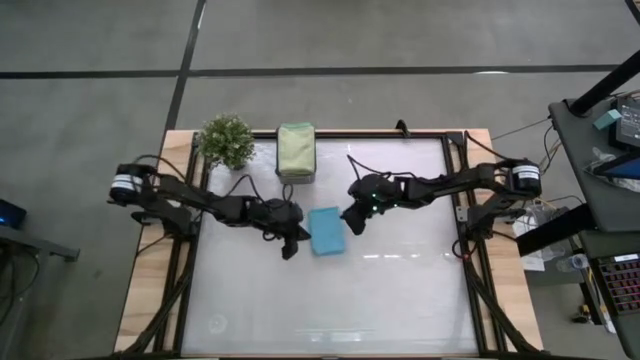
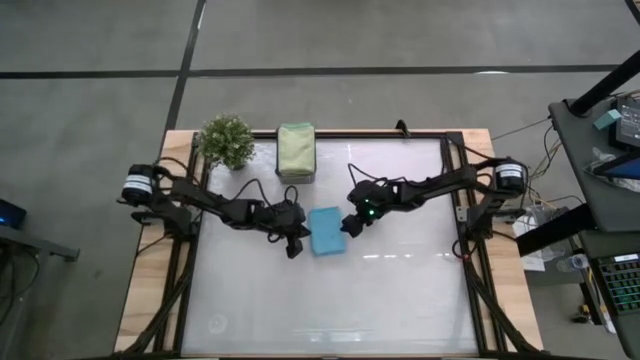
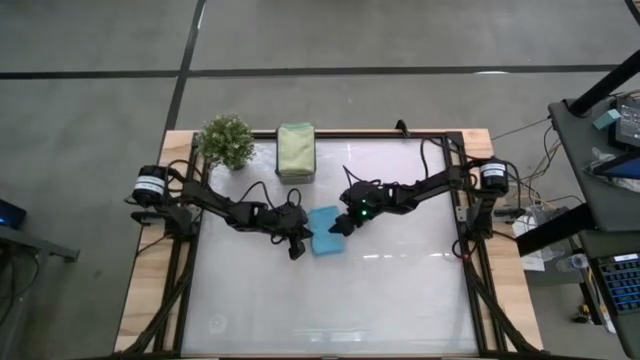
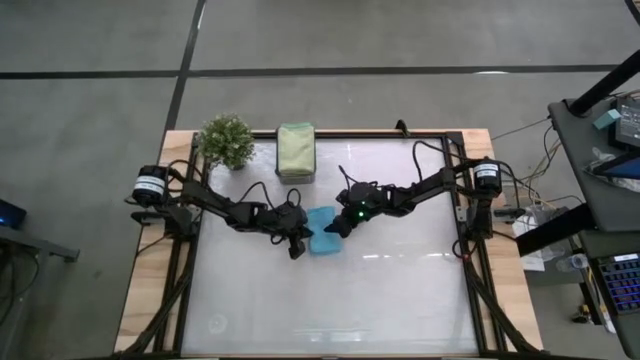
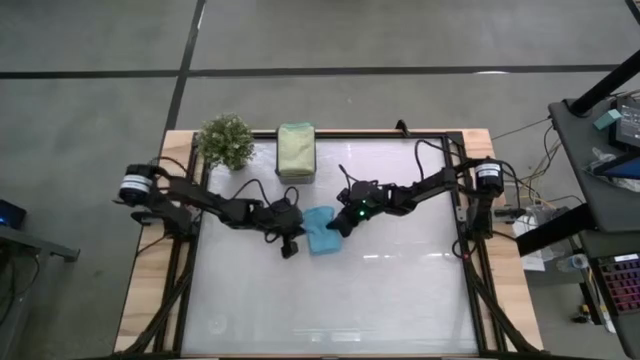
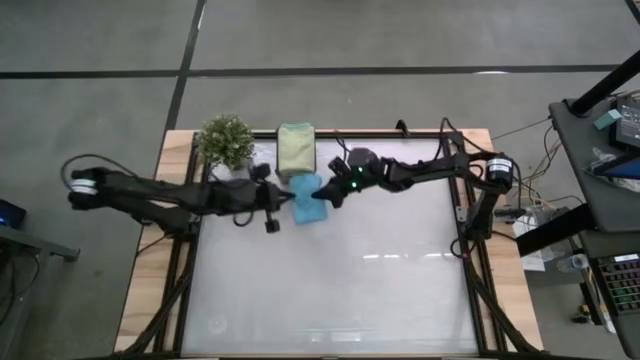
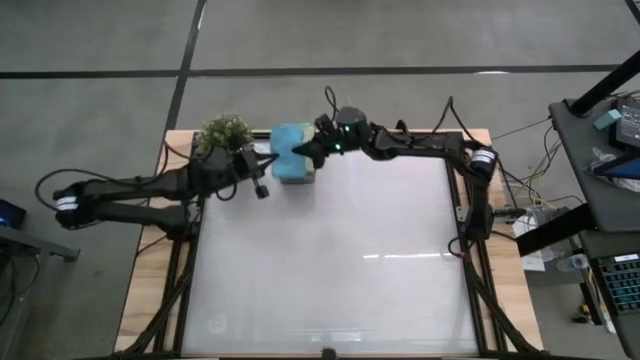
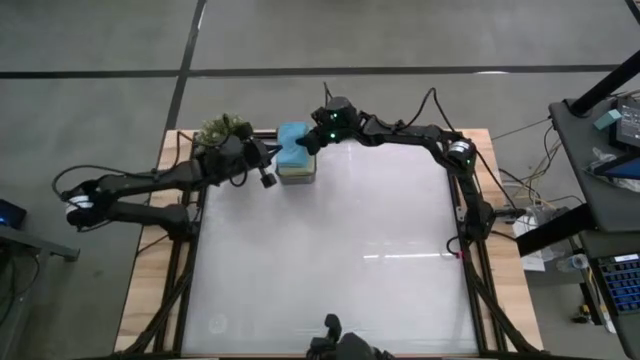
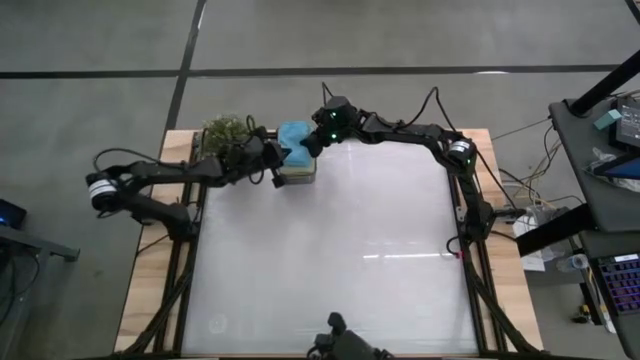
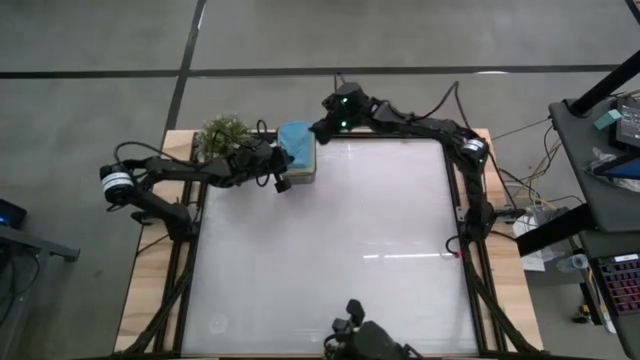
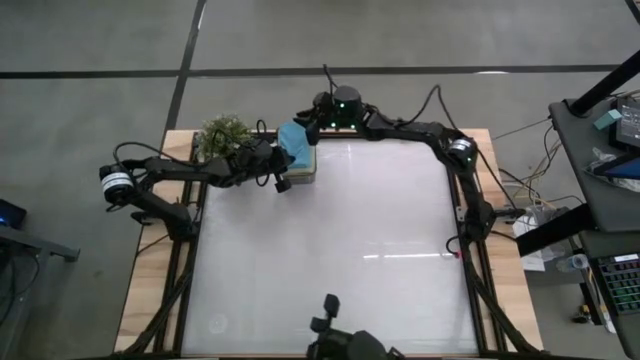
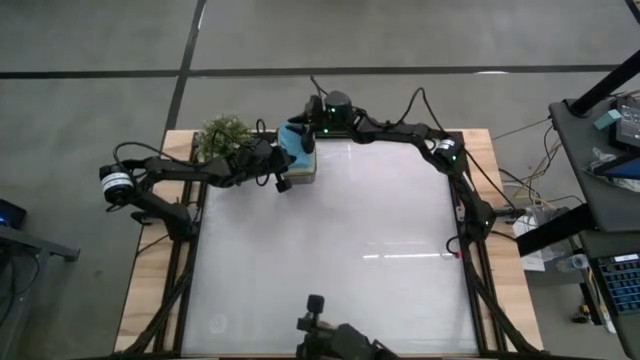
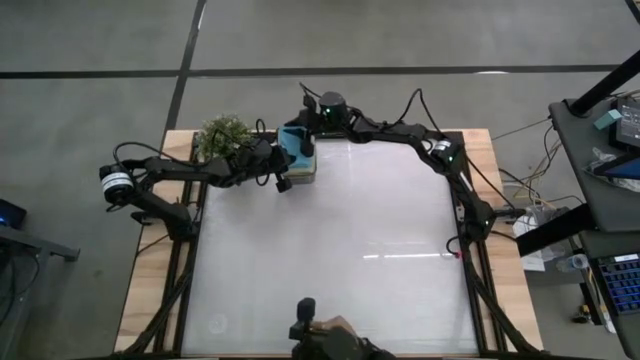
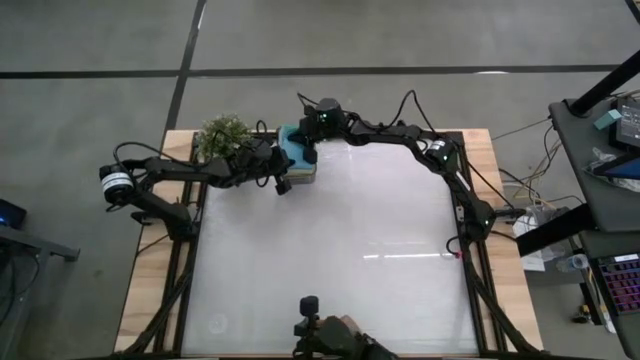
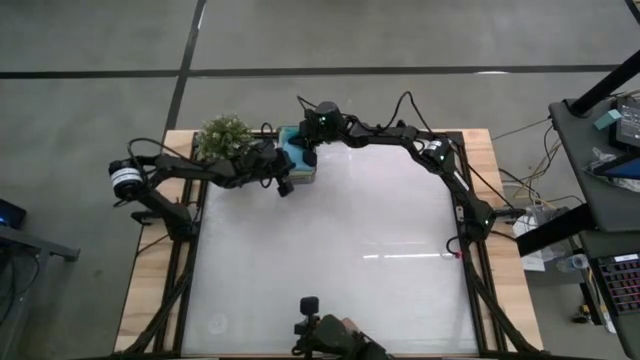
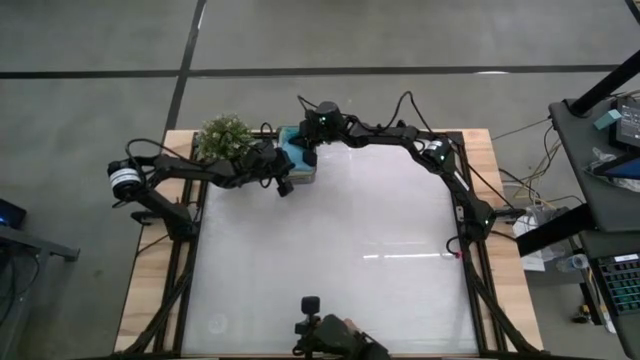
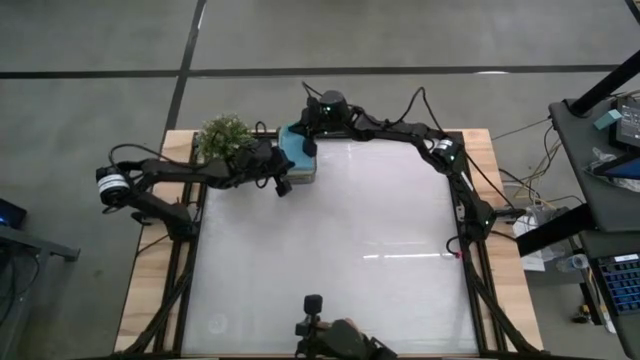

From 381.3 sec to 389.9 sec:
Task: Fold microfiber towels
Put the blue folded towel into the bin

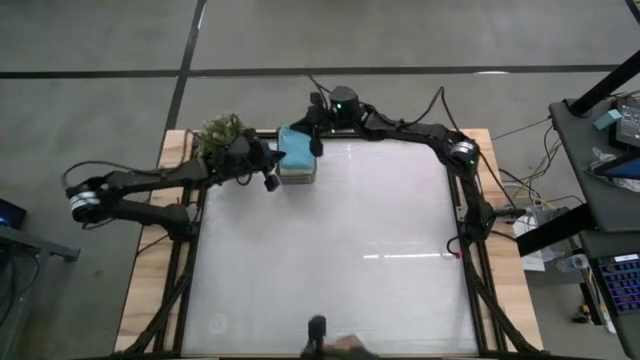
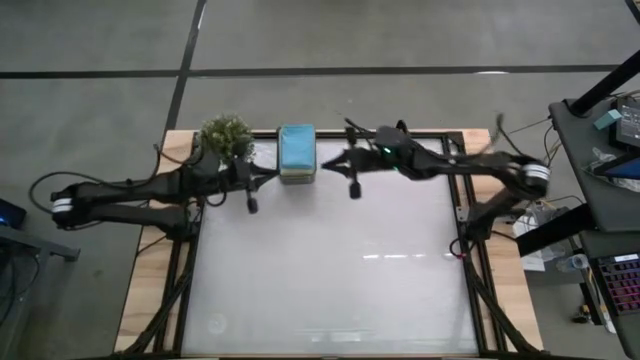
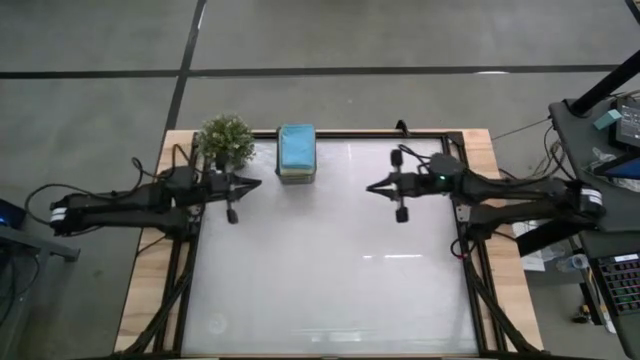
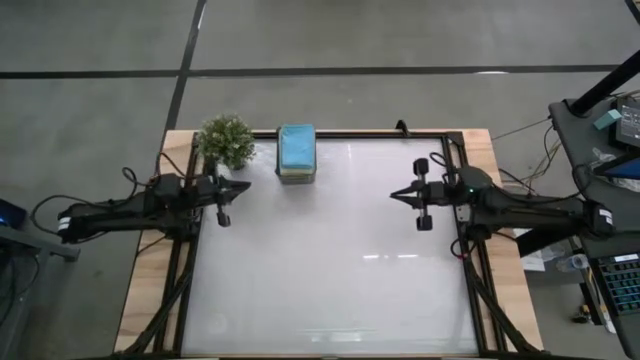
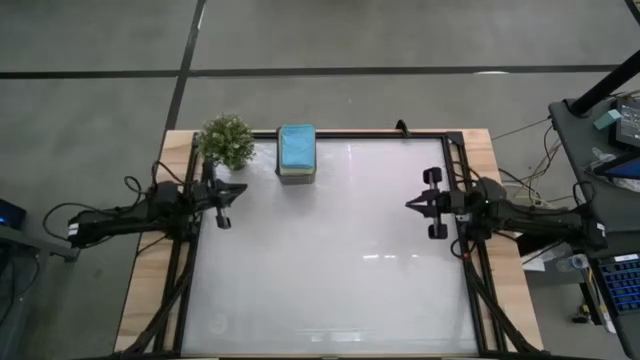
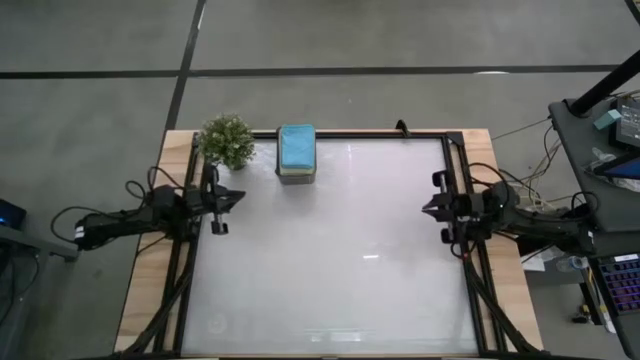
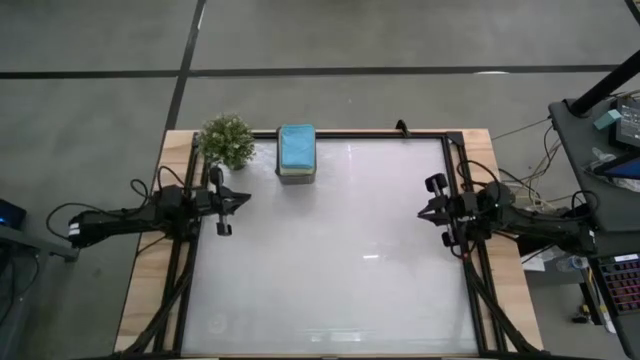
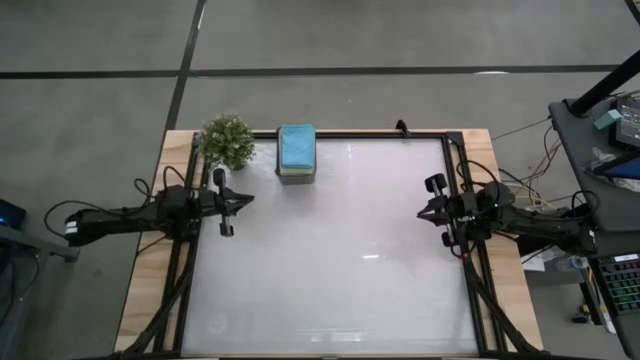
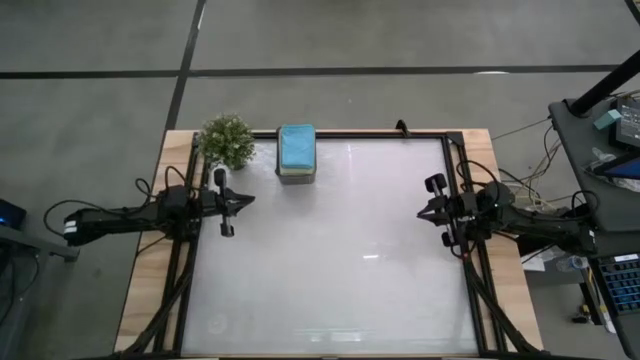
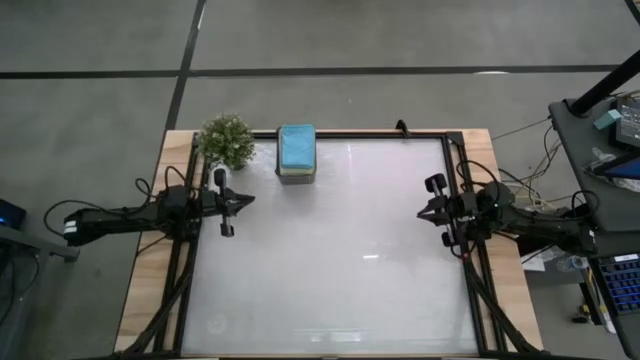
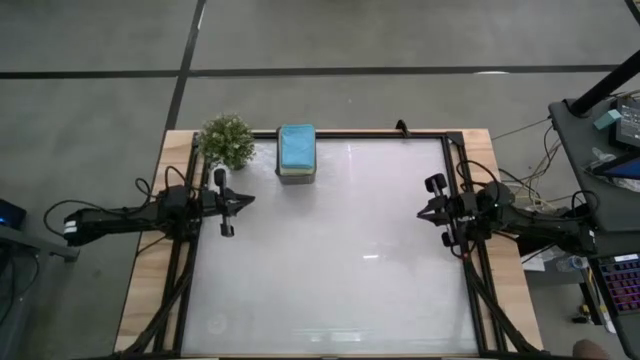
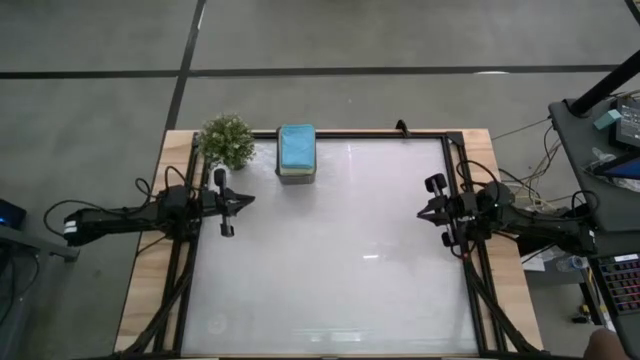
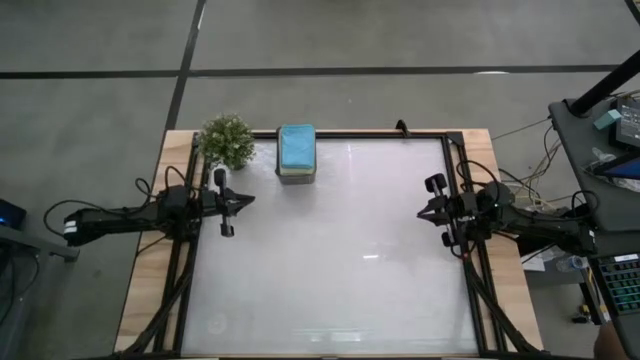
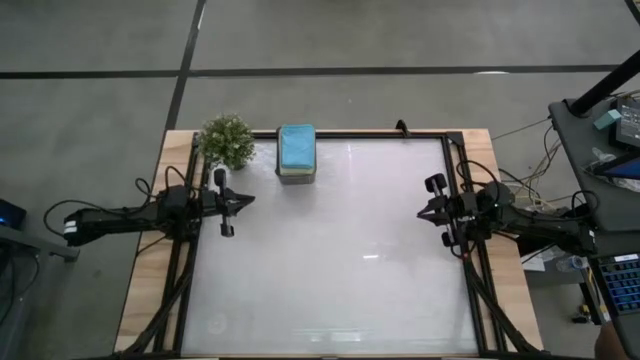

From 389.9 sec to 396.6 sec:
Return to Home Position
